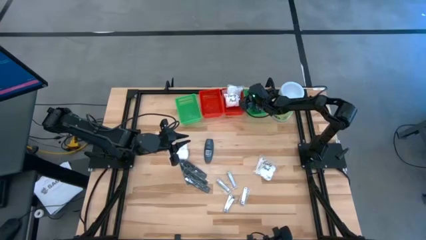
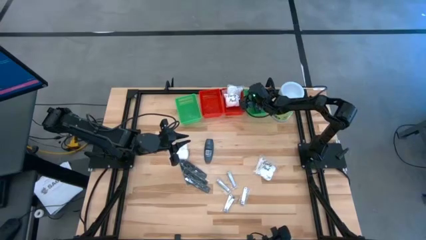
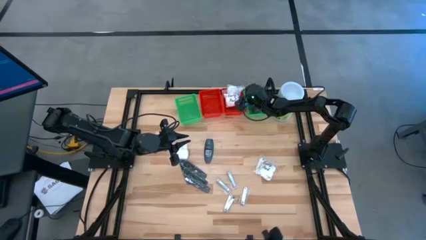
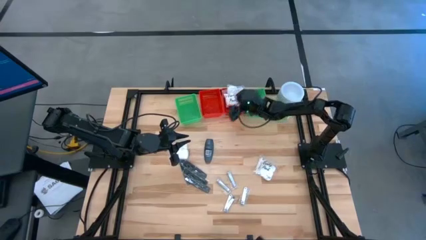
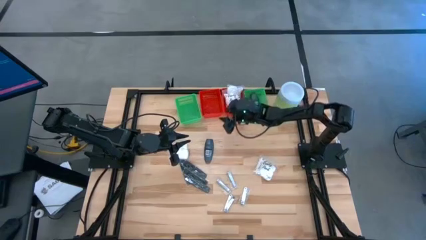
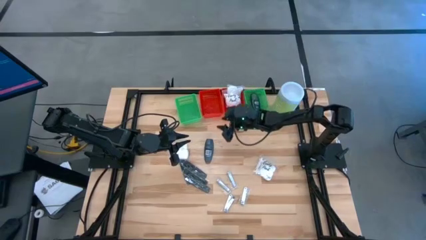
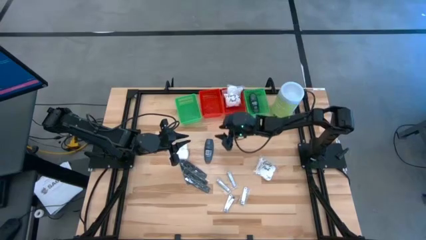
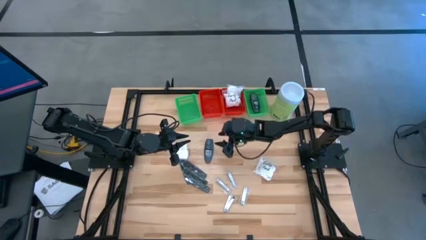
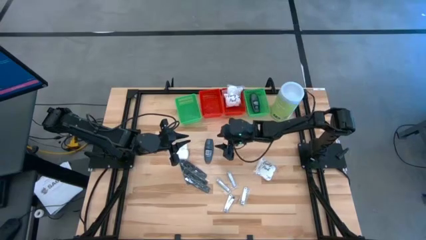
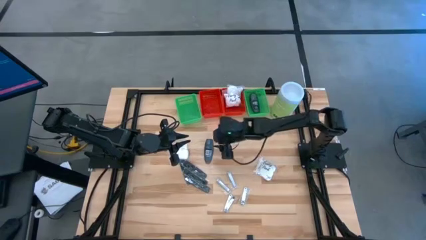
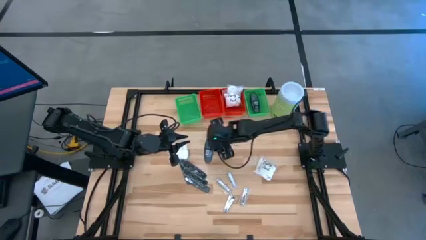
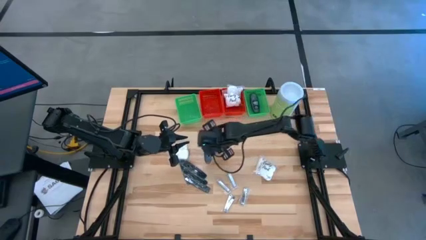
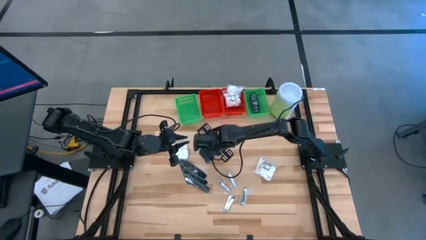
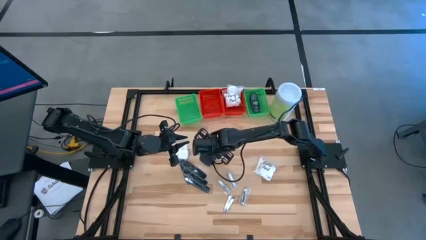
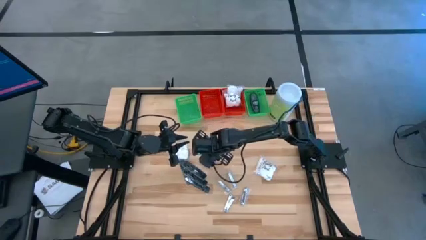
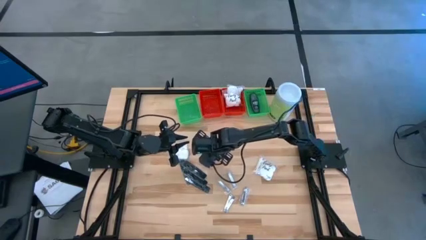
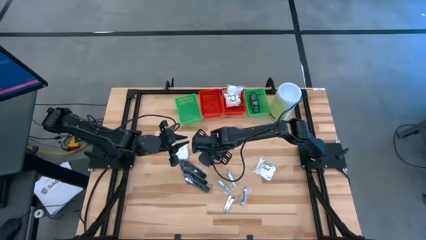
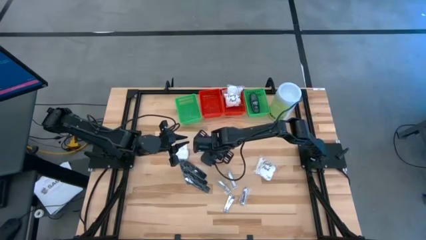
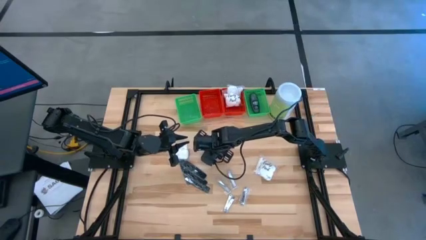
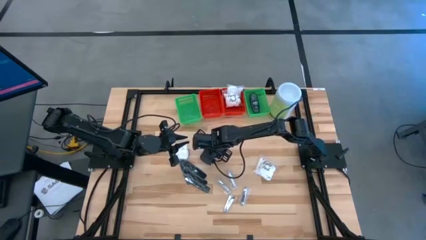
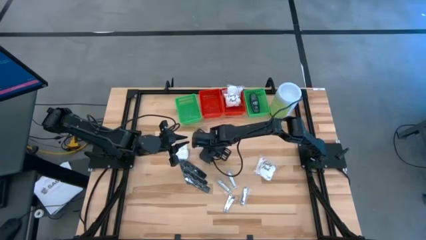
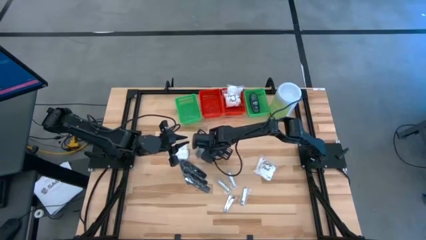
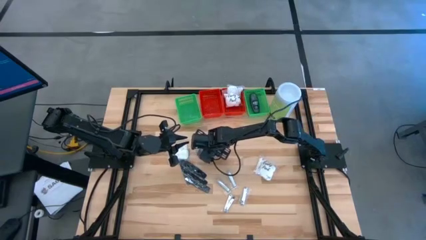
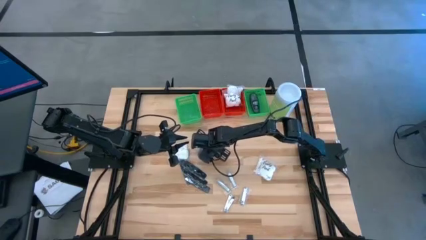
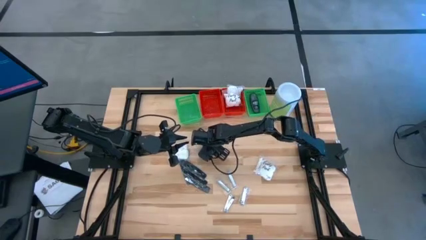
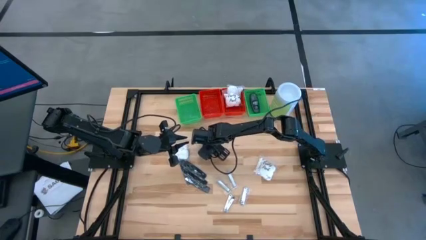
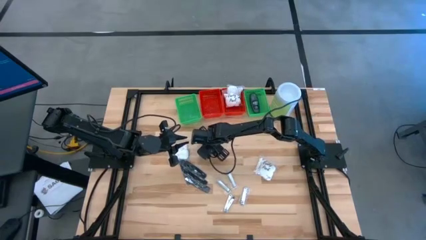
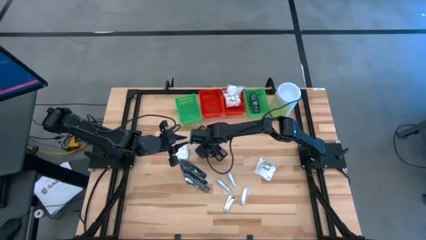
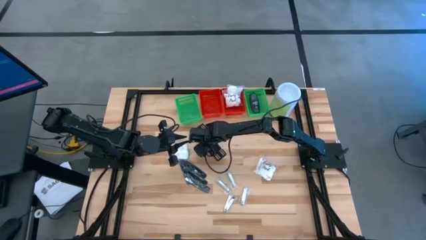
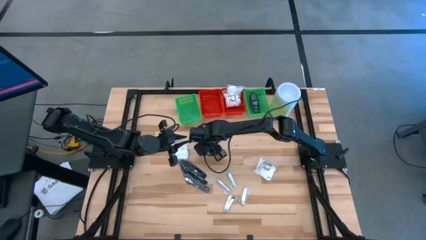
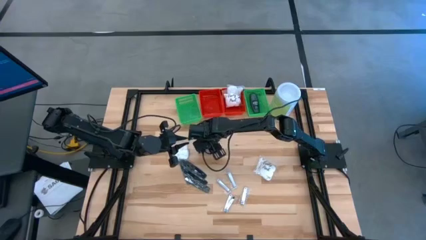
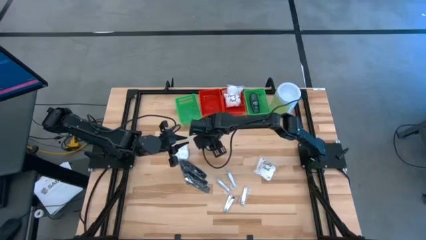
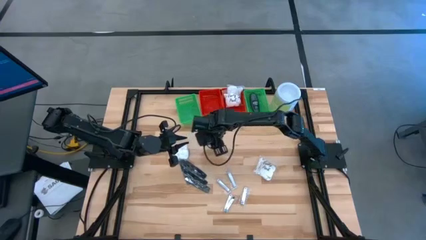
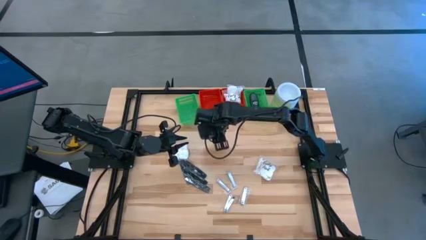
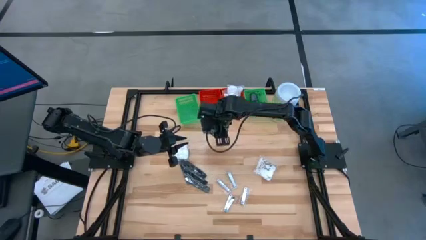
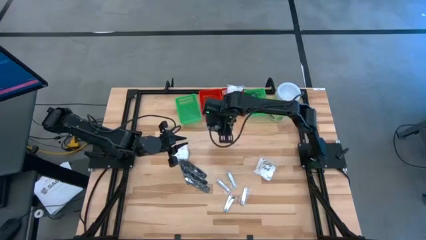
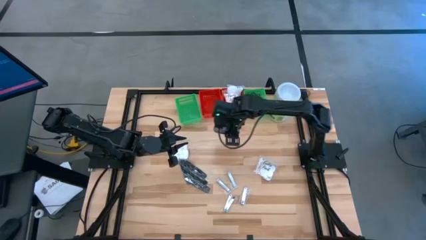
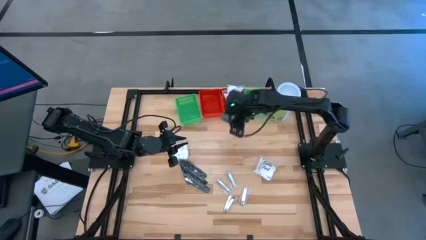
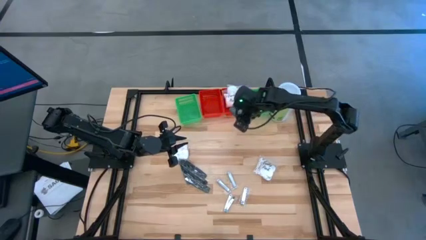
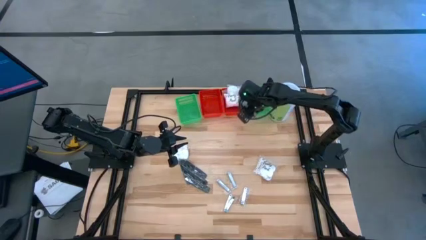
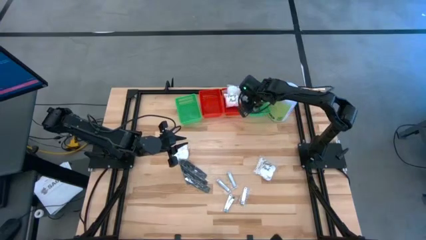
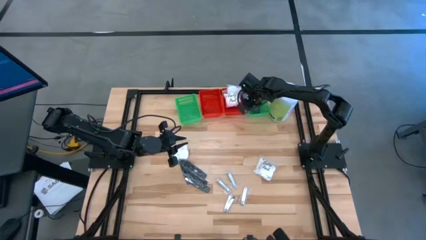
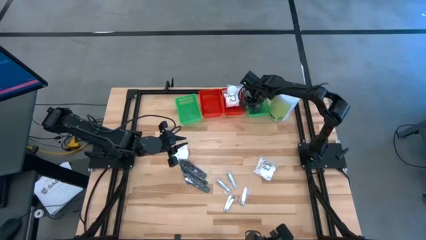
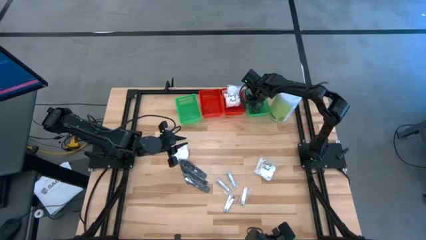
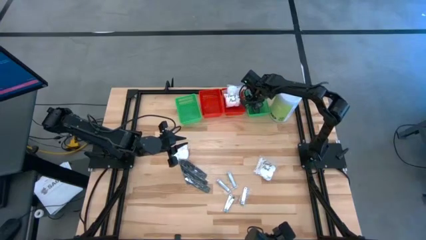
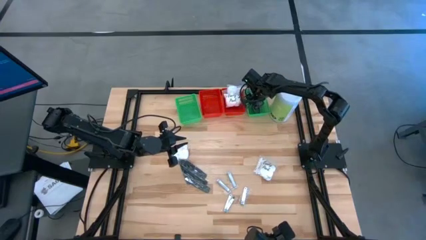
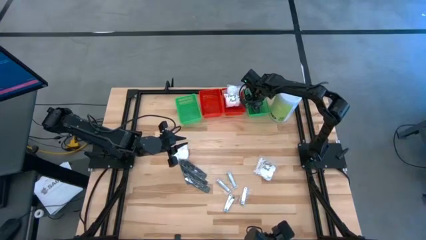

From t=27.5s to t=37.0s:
Task: Pick & Place Travel size toiletries
Put the gray deodorant into the right green bin
